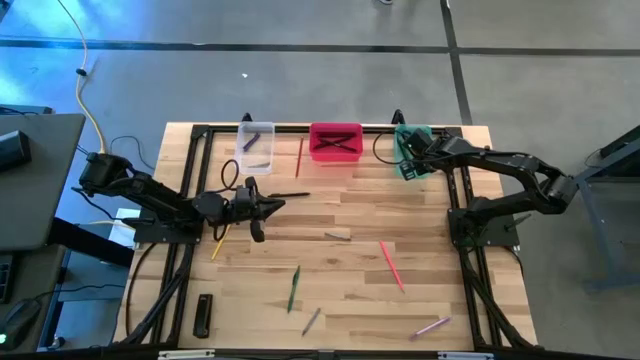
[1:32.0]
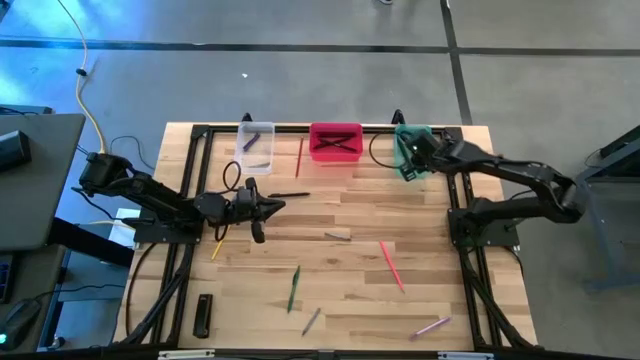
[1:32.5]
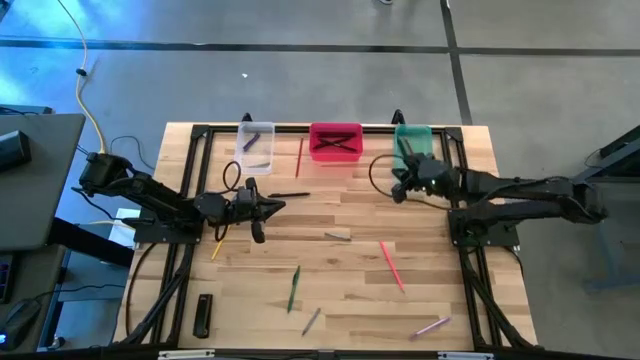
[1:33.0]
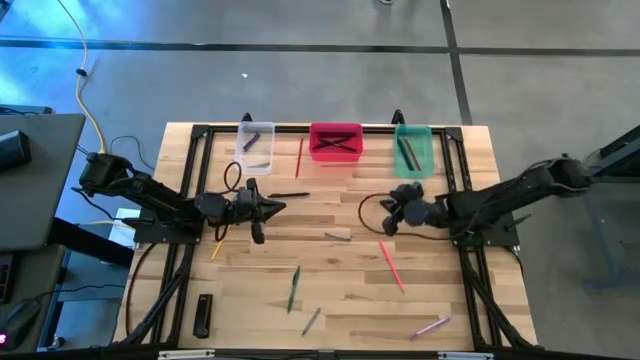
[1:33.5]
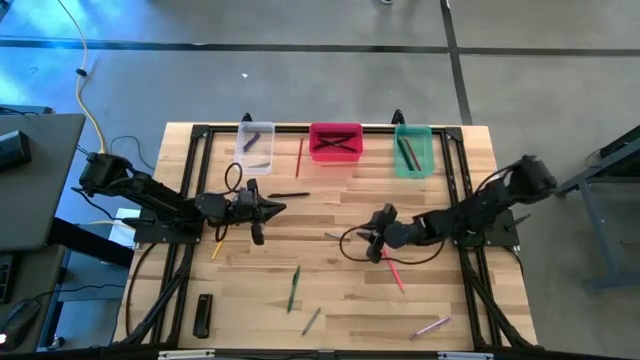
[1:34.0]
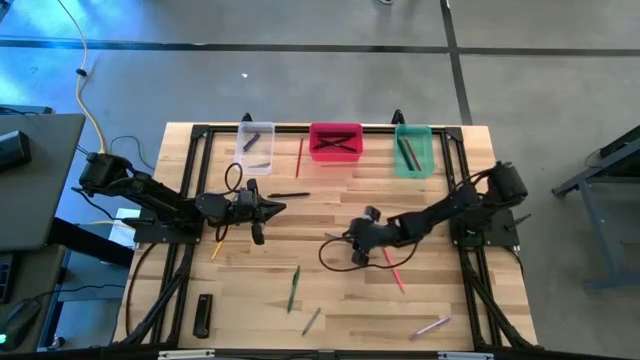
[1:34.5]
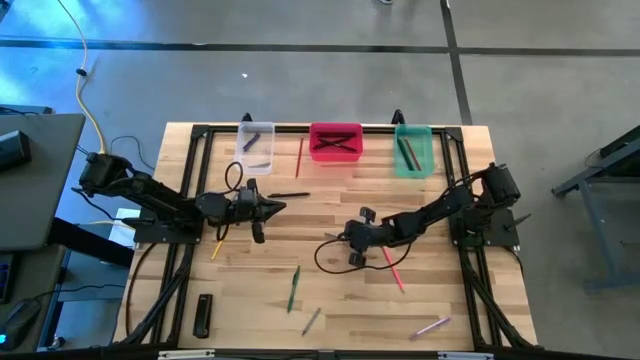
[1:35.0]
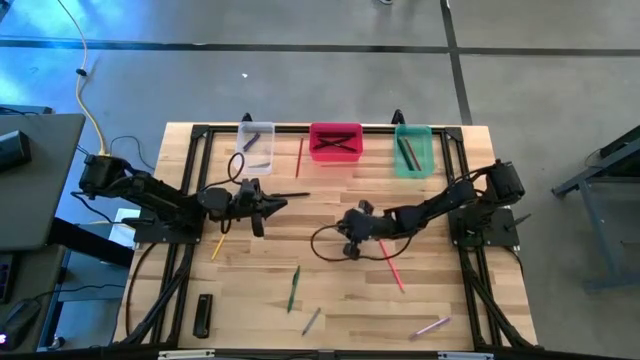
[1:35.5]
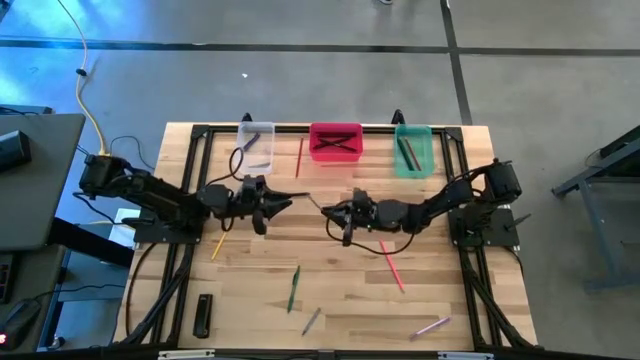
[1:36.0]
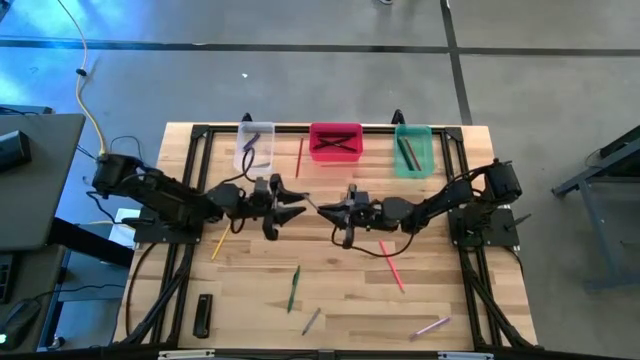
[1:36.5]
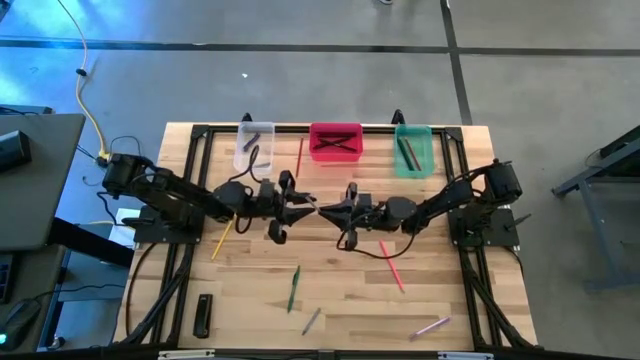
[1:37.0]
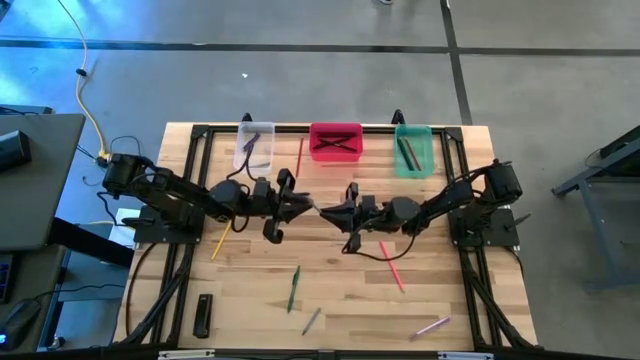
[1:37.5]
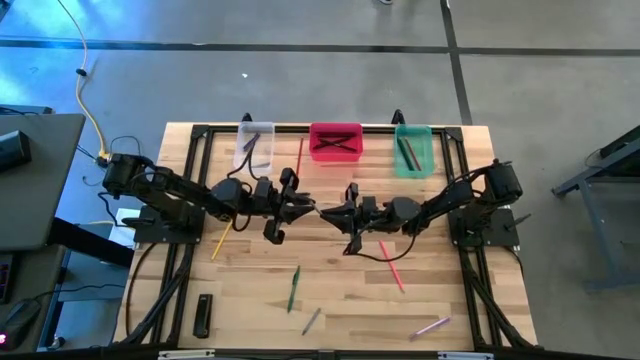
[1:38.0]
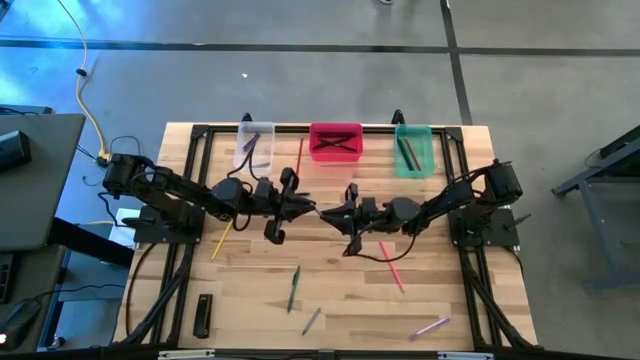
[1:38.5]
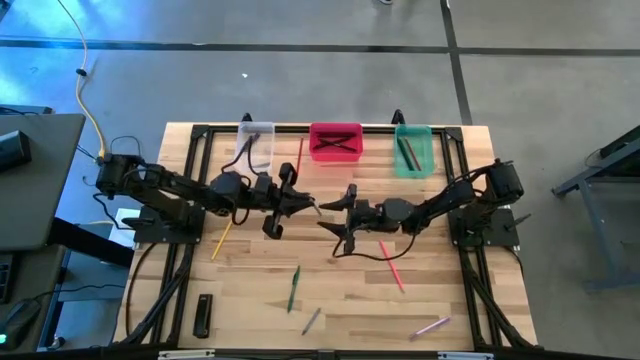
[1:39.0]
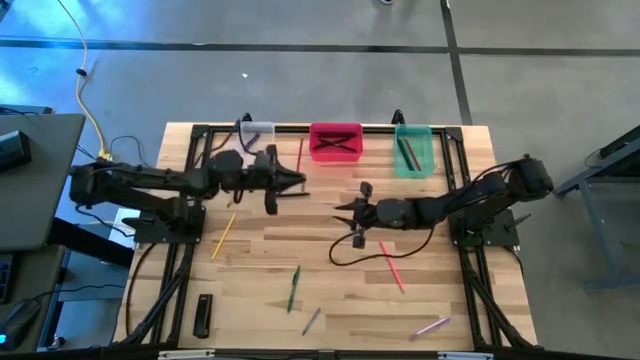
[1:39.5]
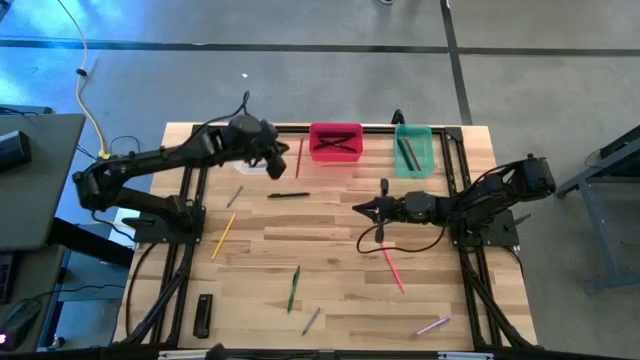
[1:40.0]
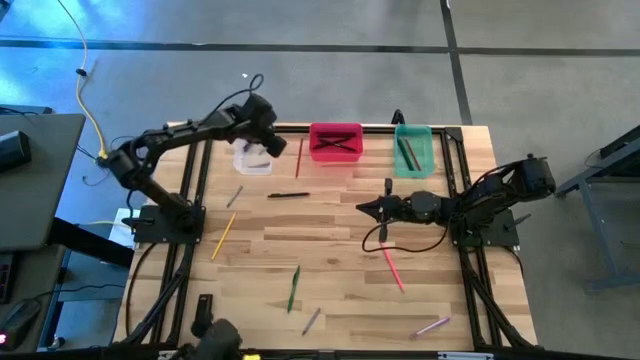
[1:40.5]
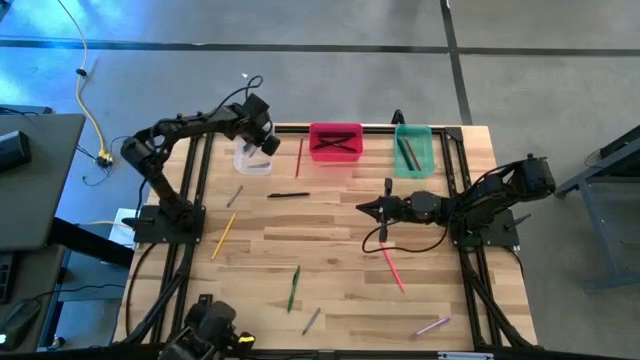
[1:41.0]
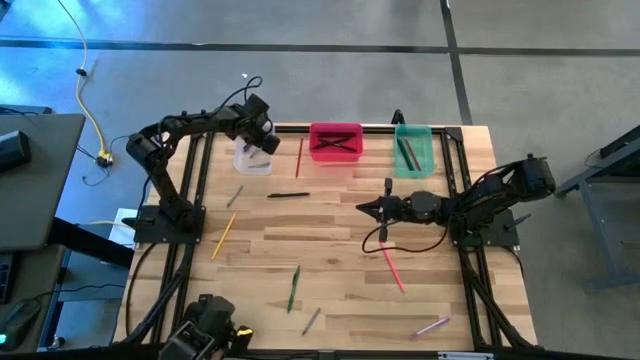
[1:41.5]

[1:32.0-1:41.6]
Task: Sort crayons/erasers/pens/pencils in bins
Put the gray crayon into the transparent bin

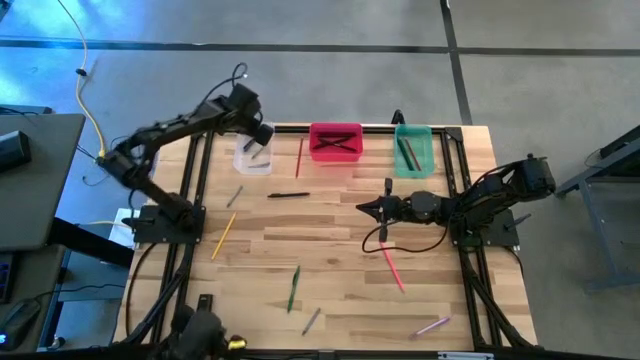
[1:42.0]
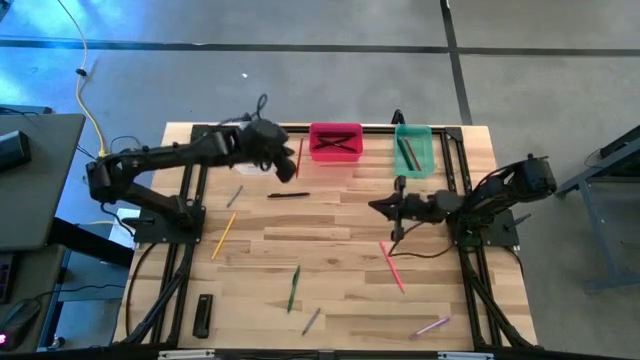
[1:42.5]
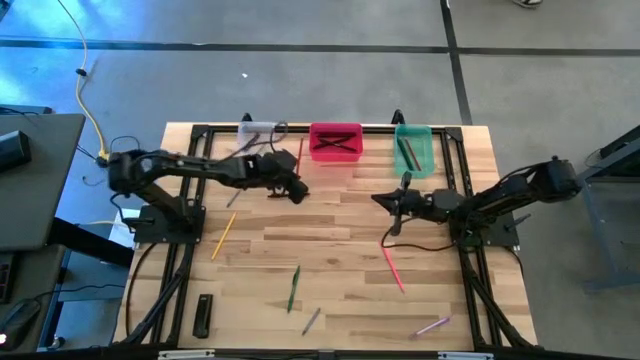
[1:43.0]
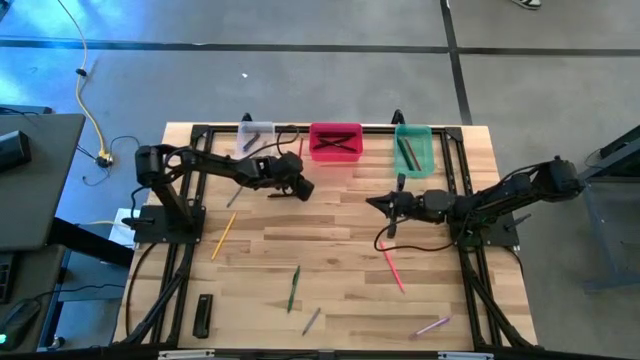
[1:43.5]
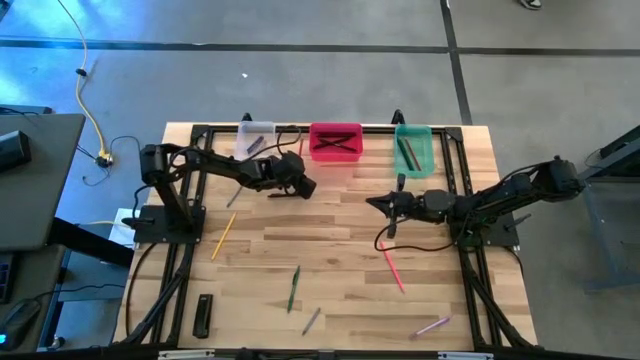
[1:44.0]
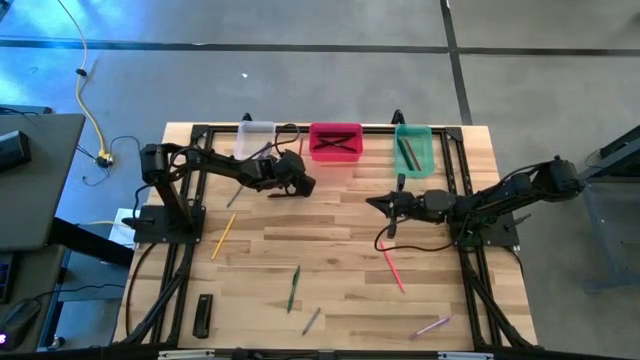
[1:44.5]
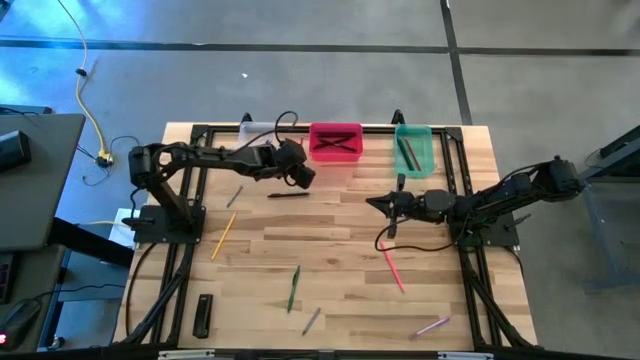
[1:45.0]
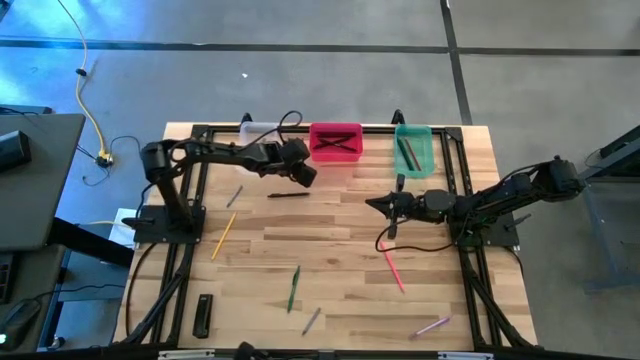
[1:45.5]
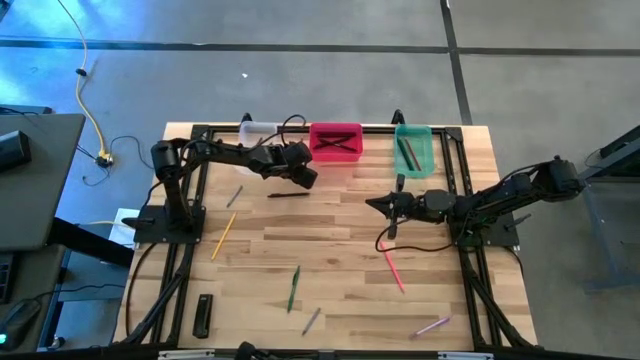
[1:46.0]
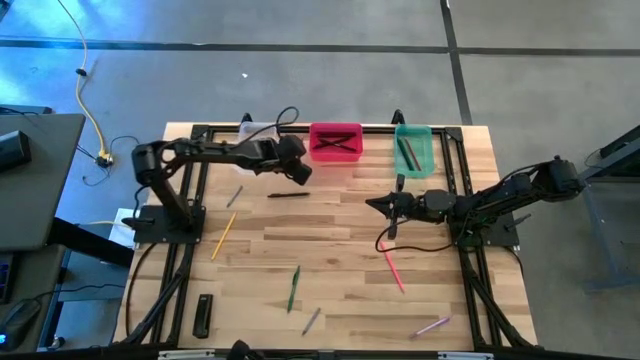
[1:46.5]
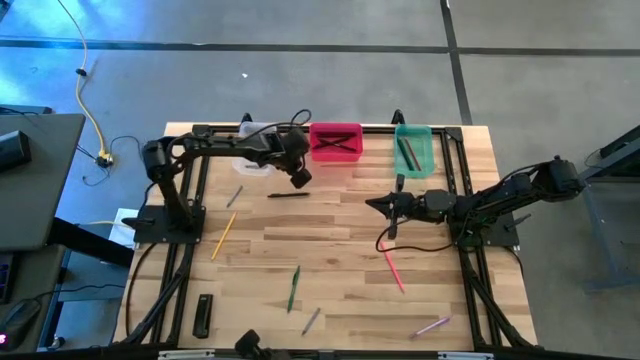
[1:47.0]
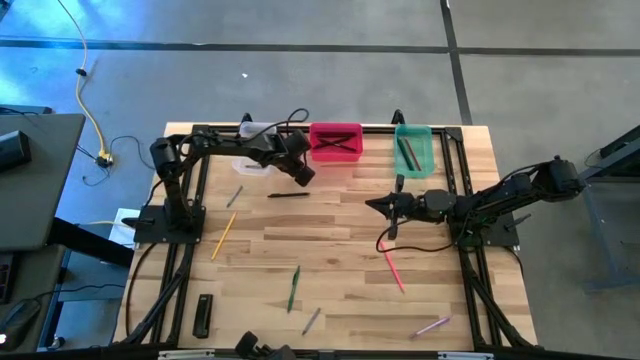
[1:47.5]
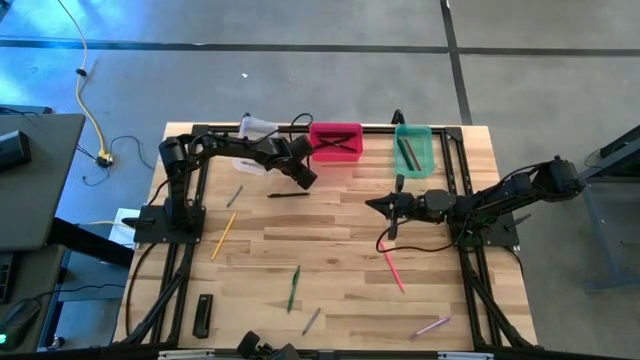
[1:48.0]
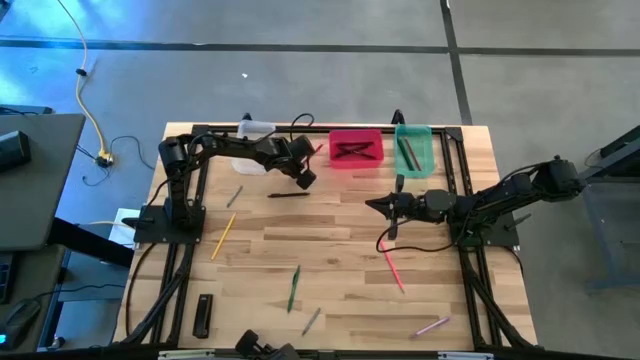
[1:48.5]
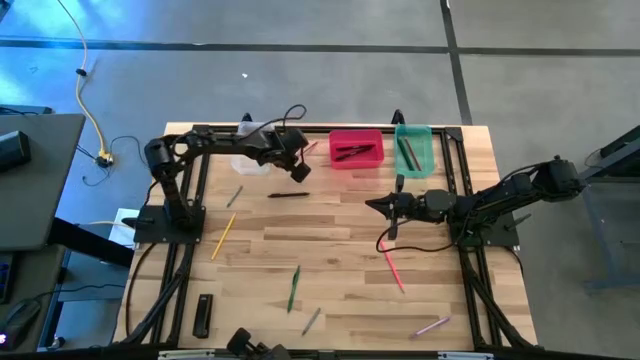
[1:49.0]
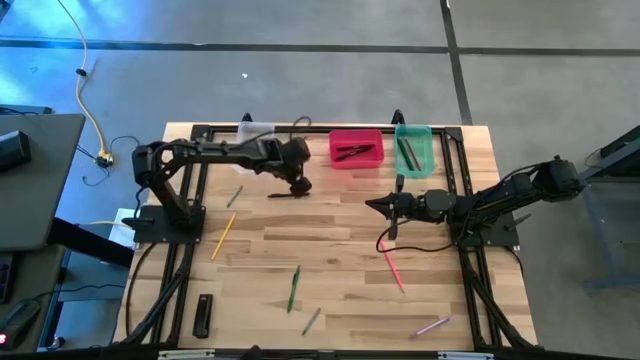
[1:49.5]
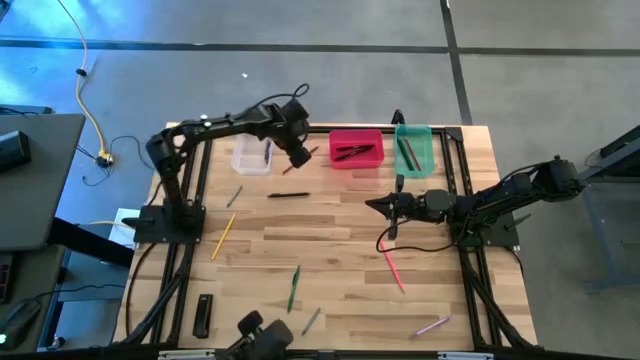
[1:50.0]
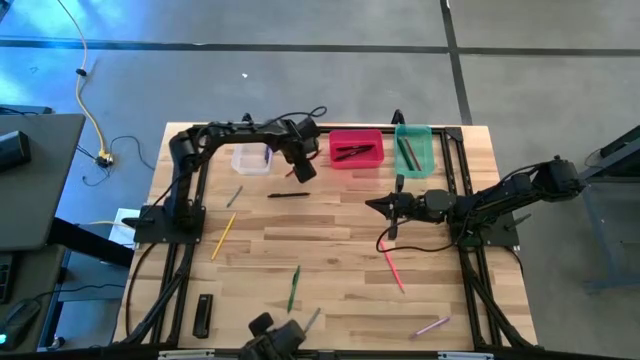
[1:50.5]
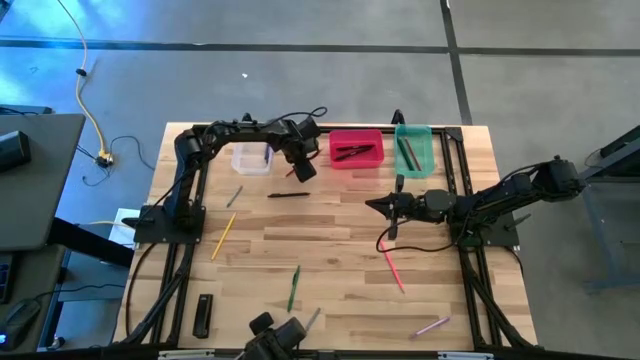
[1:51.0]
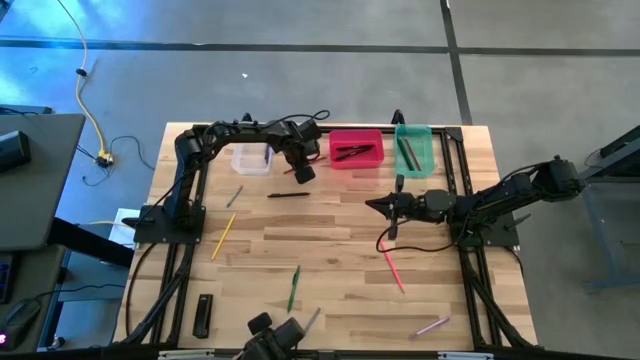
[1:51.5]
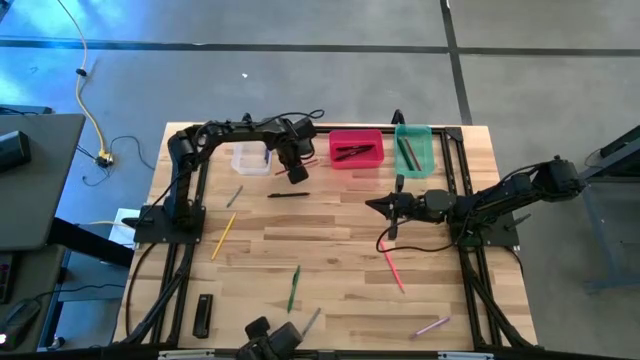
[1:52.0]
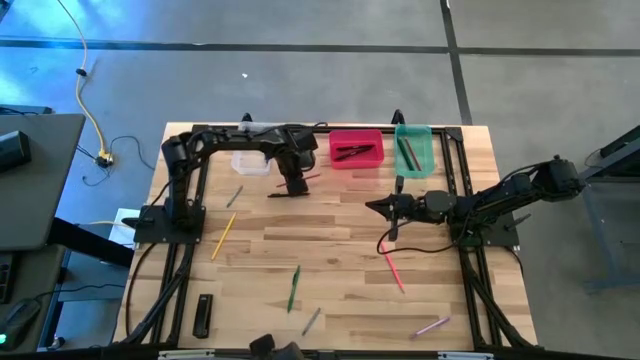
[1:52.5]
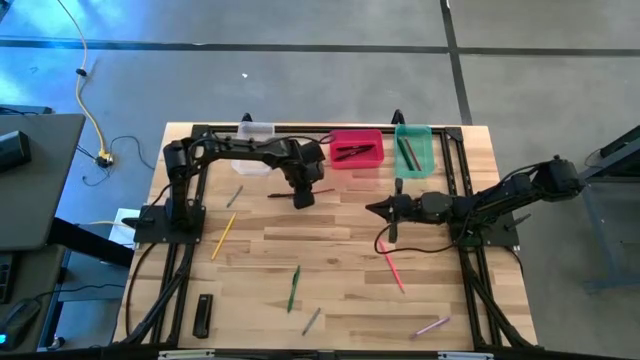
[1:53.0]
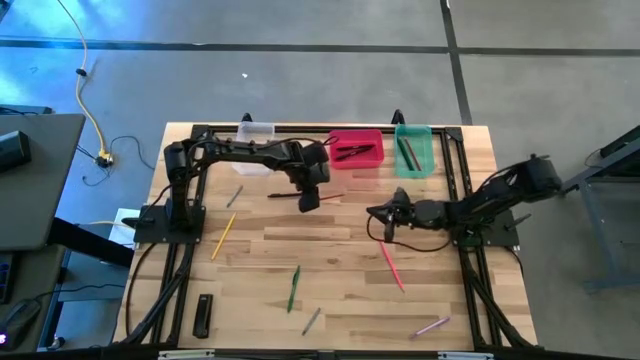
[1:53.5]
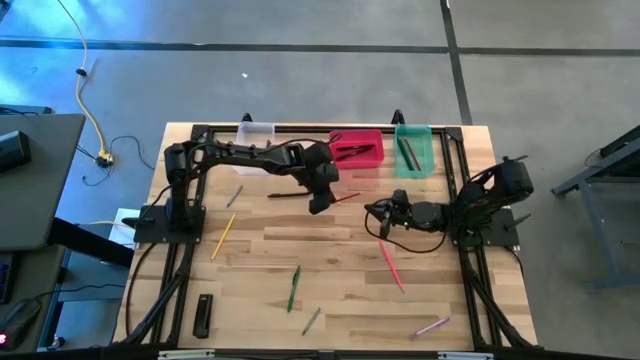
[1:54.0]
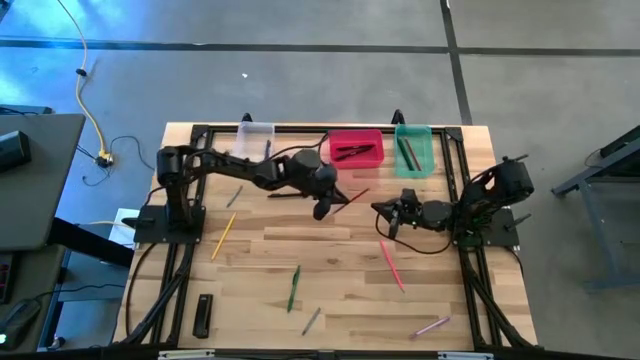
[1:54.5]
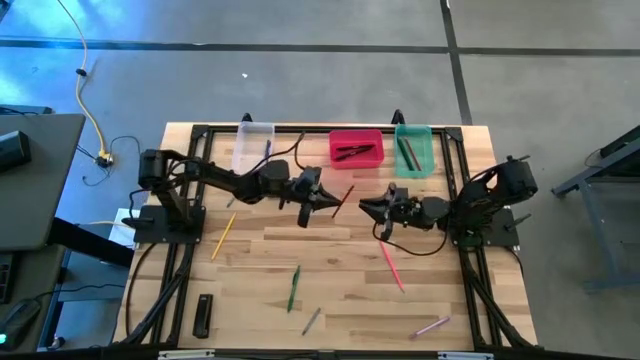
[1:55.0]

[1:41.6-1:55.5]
Put the red pencil into the blue bin
